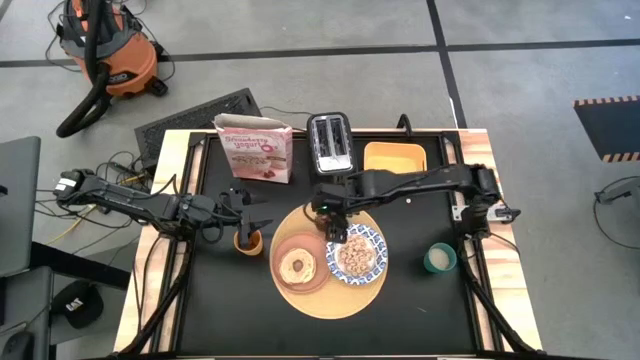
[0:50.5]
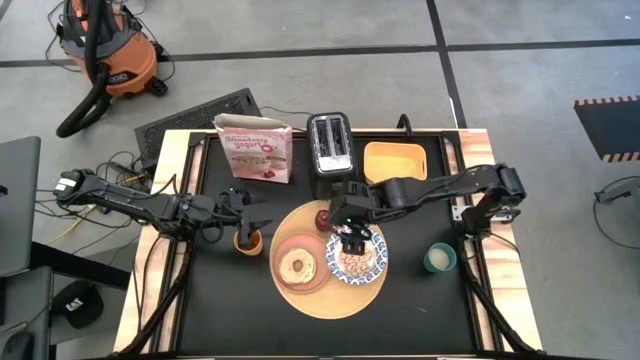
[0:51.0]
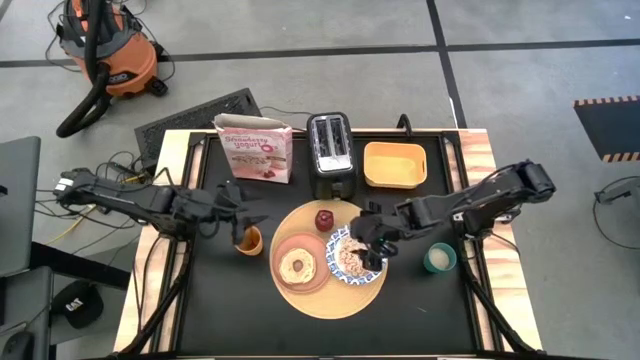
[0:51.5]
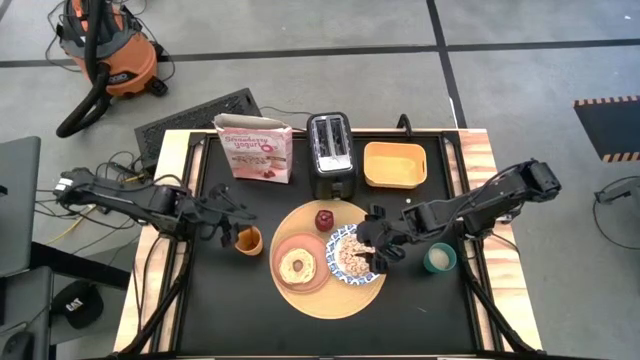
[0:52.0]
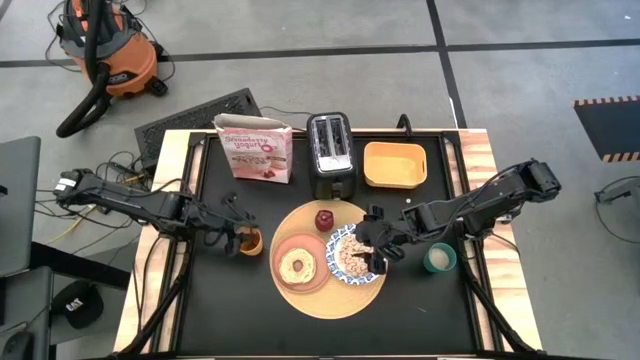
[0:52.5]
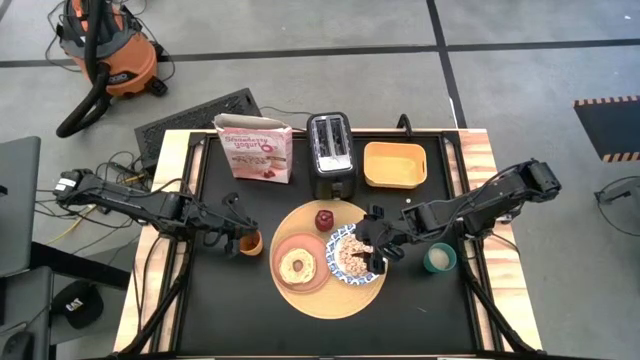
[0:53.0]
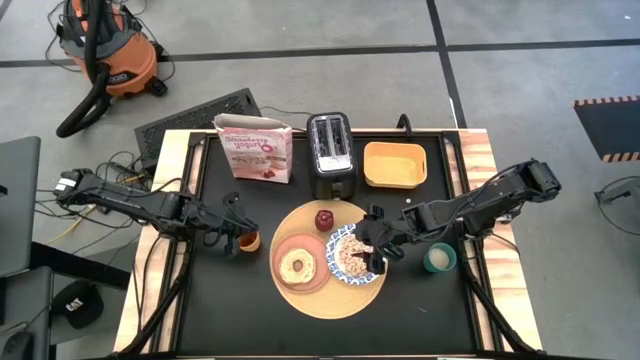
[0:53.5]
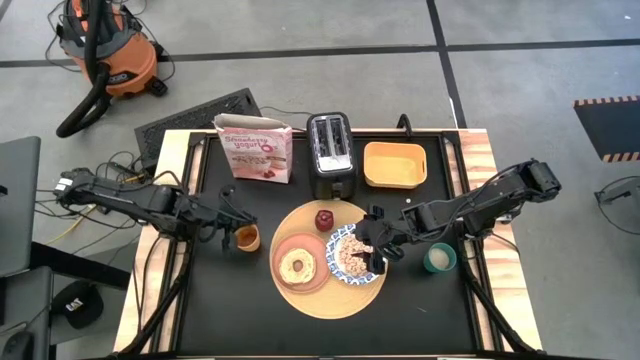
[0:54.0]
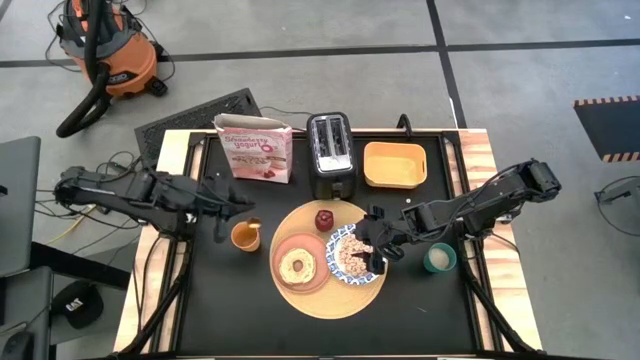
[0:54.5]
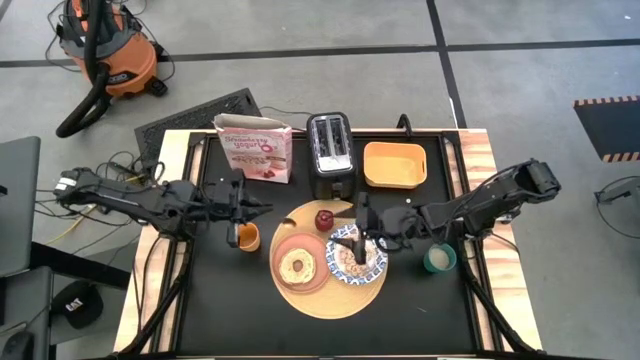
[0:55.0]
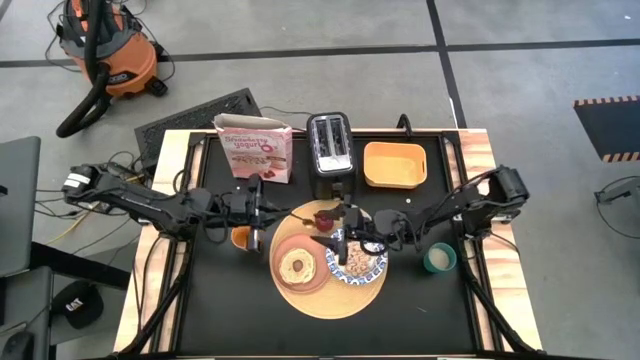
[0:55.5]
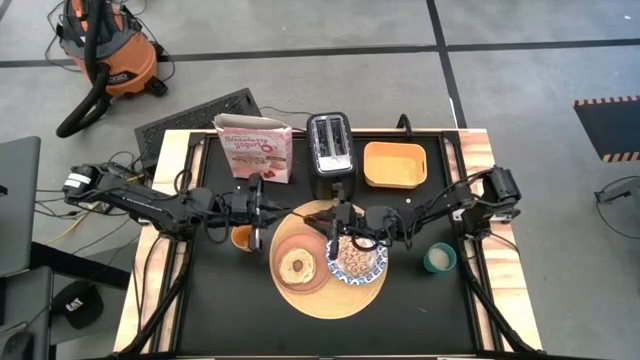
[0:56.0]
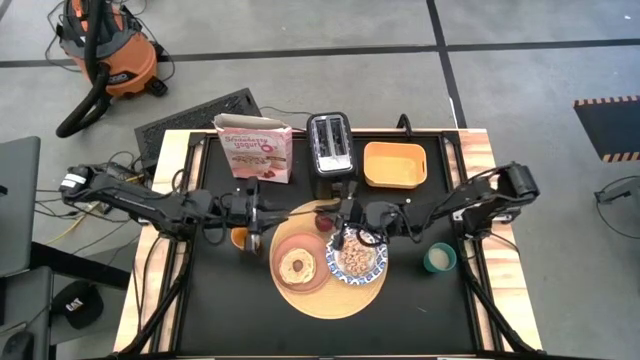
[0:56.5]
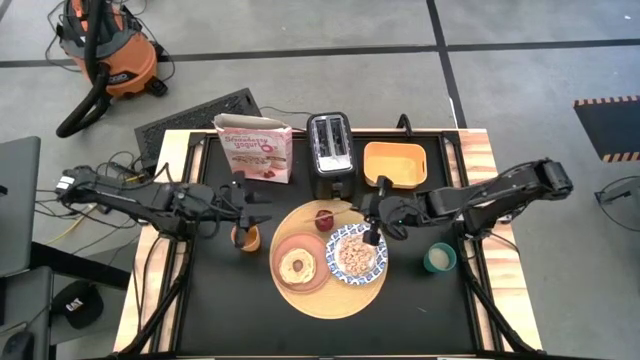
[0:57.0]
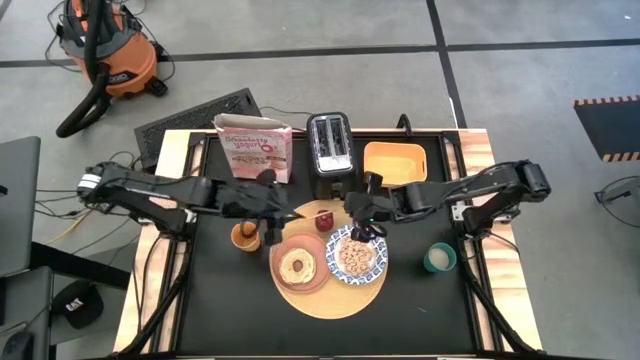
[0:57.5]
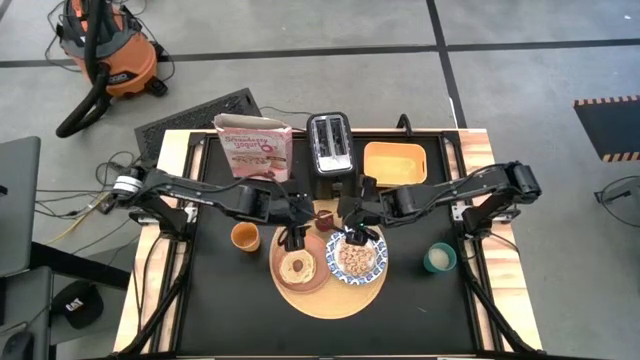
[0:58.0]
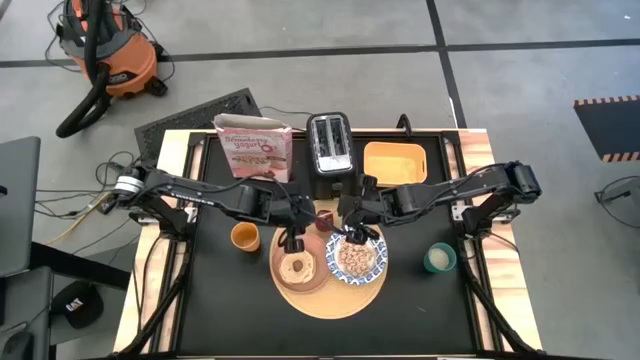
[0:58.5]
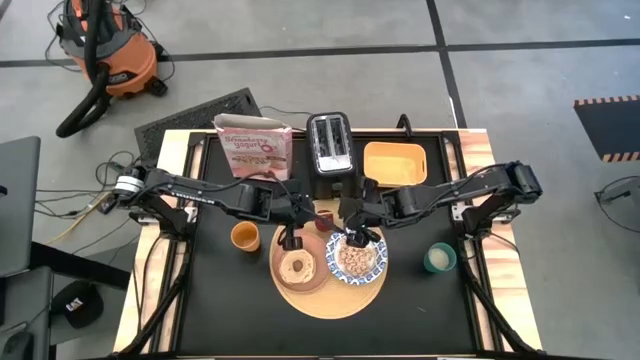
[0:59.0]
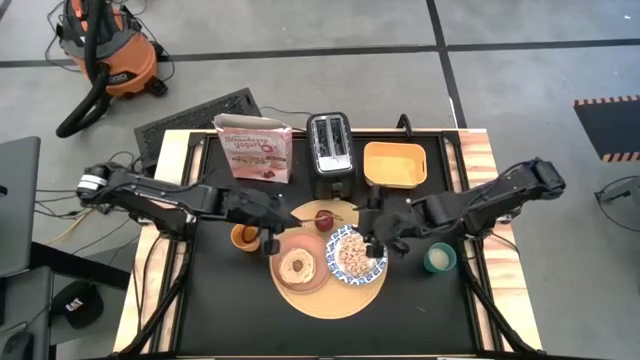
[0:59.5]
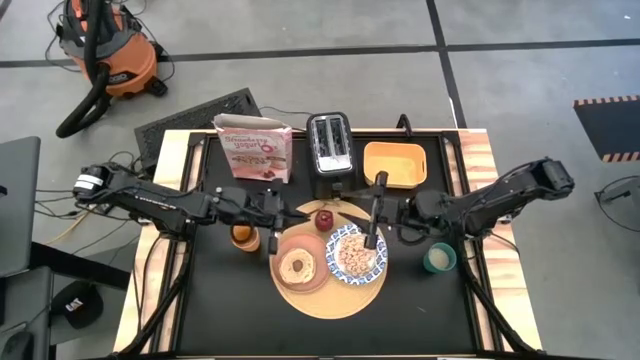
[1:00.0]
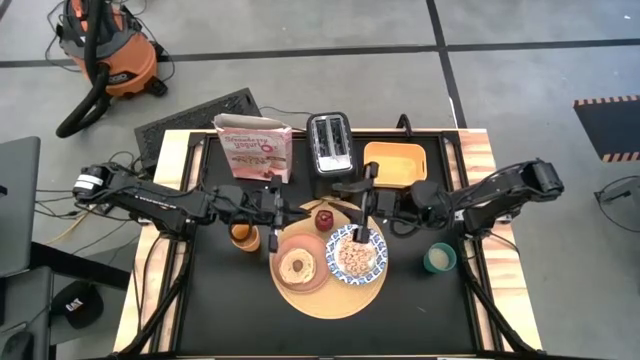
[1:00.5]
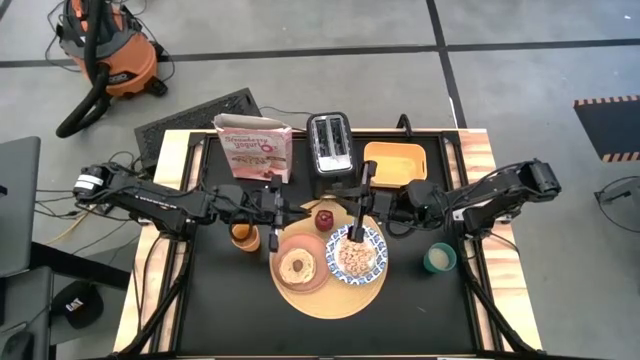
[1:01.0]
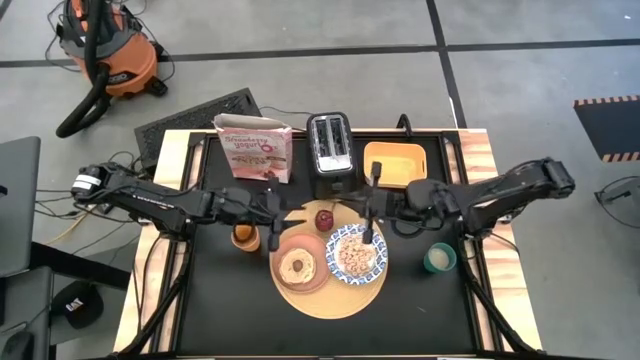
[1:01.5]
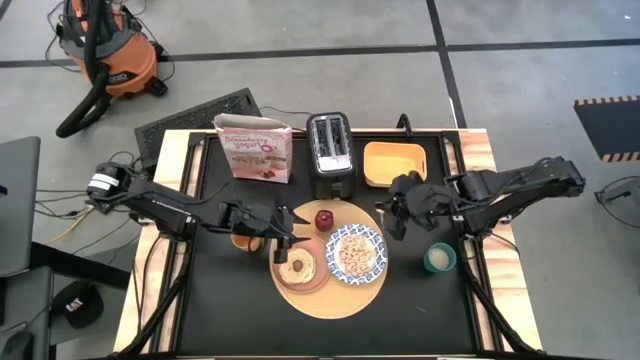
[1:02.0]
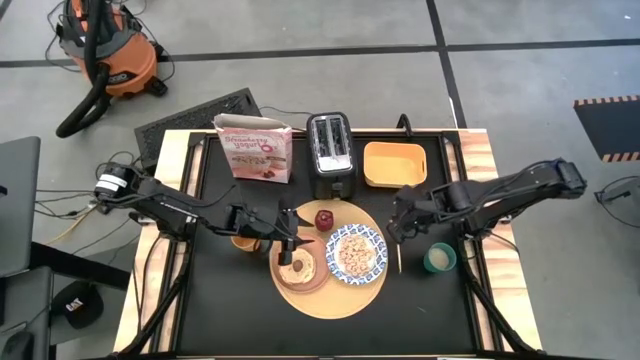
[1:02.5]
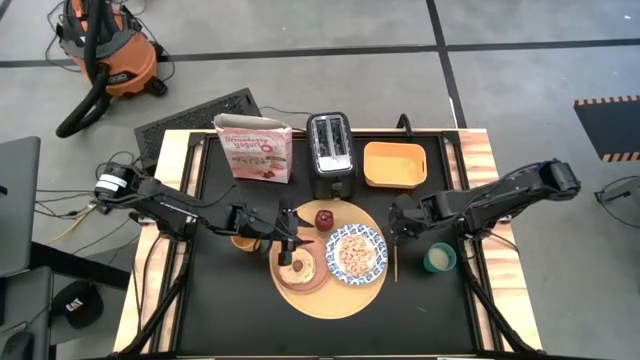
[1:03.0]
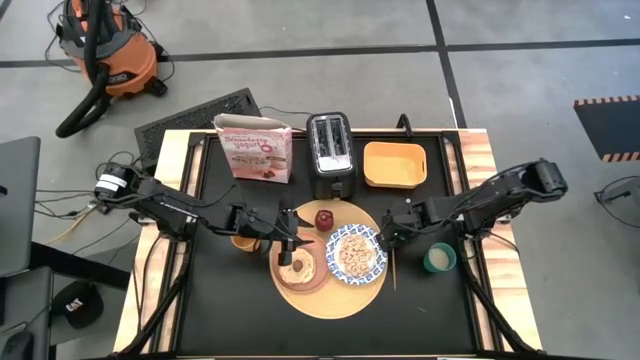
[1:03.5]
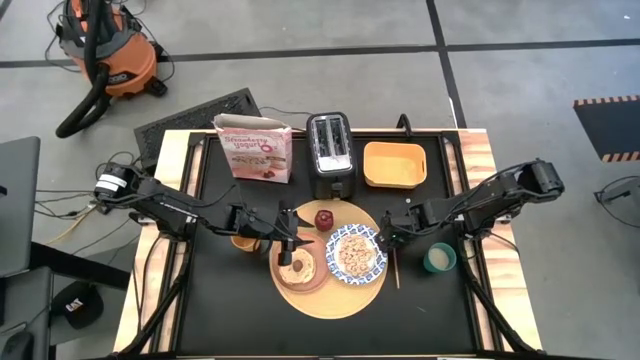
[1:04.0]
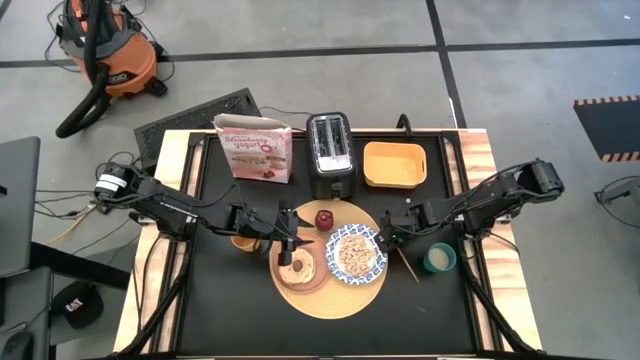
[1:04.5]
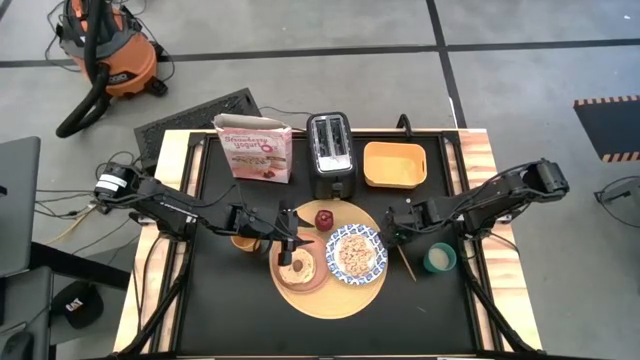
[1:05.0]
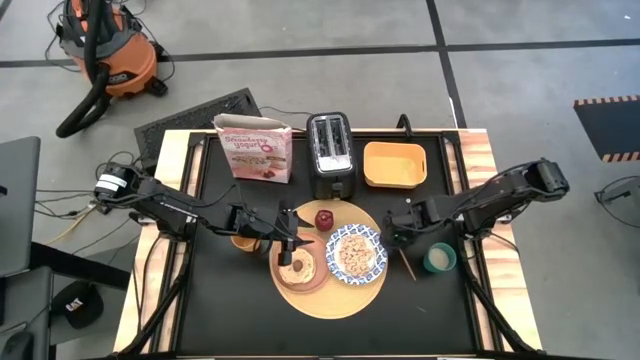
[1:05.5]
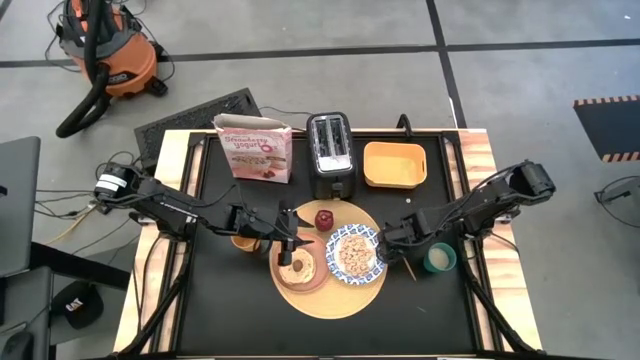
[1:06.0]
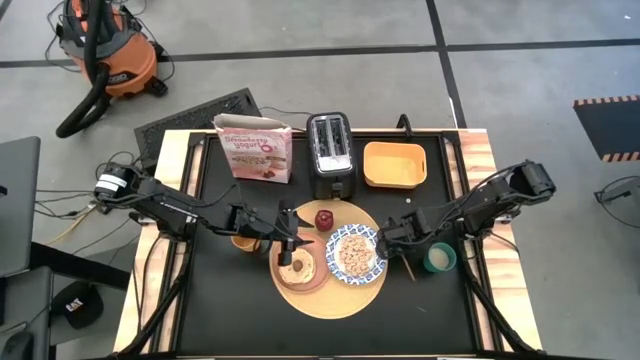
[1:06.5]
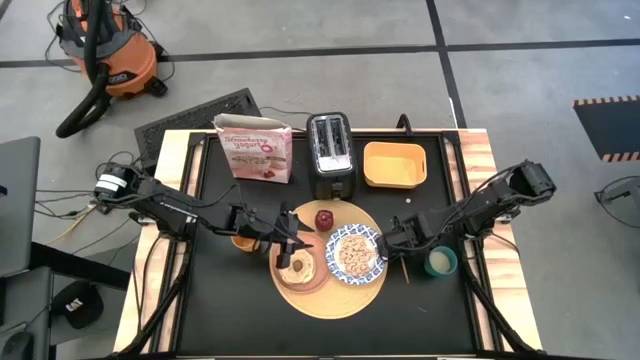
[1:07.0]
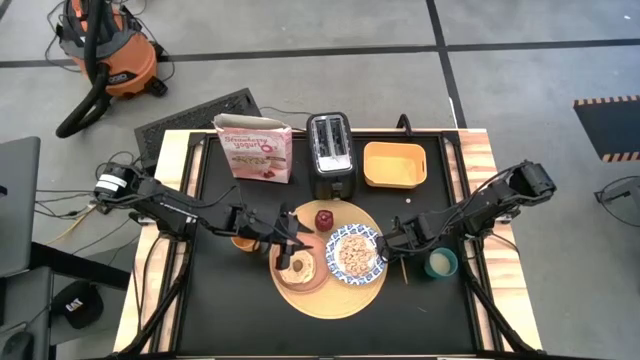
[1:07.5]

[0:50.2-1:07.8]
Task: Arrange a breakfast setting
Move the spoon beside the bowl on the table mat

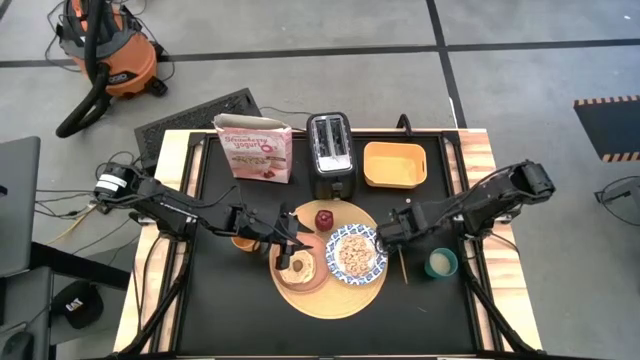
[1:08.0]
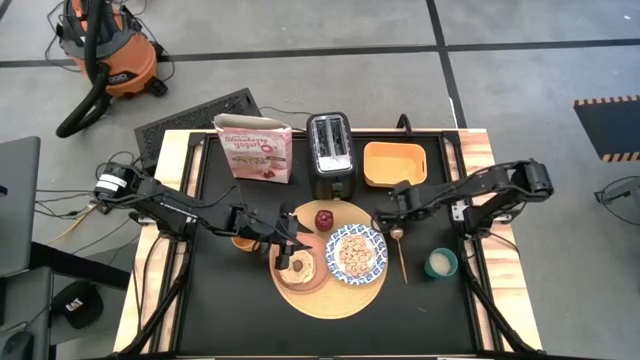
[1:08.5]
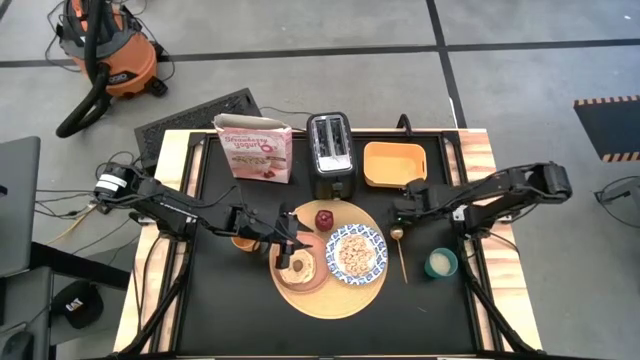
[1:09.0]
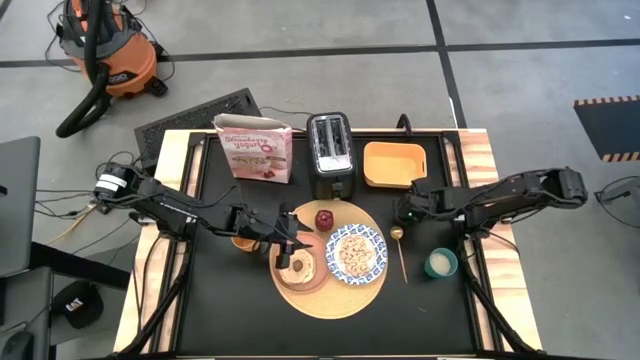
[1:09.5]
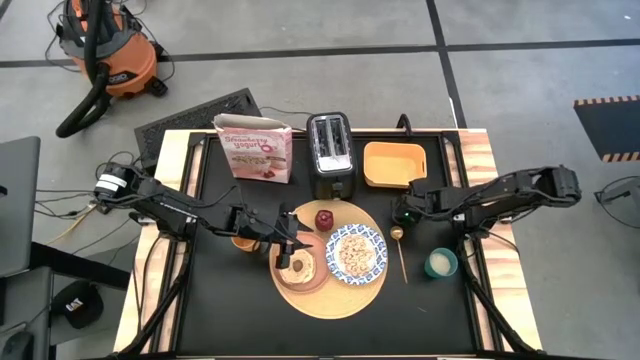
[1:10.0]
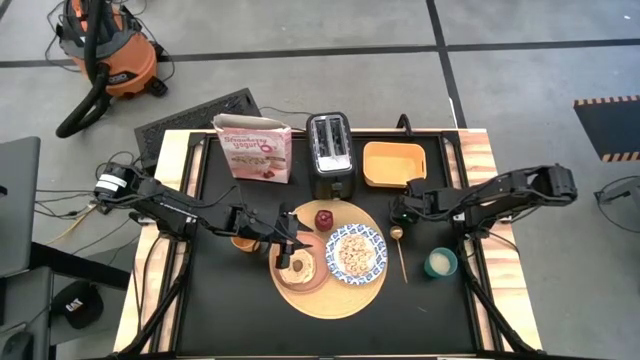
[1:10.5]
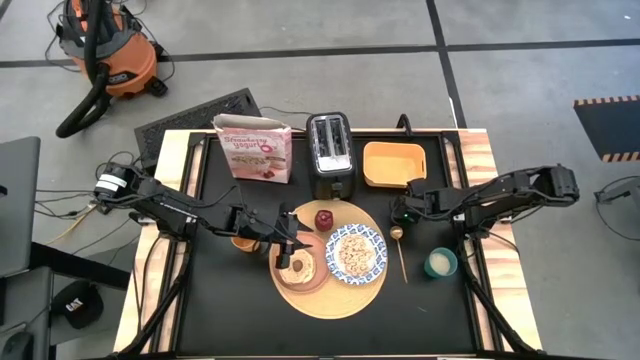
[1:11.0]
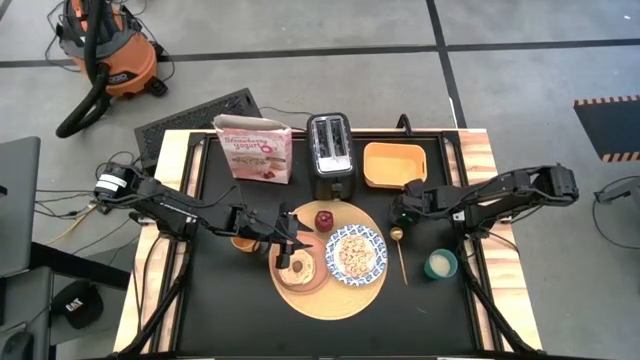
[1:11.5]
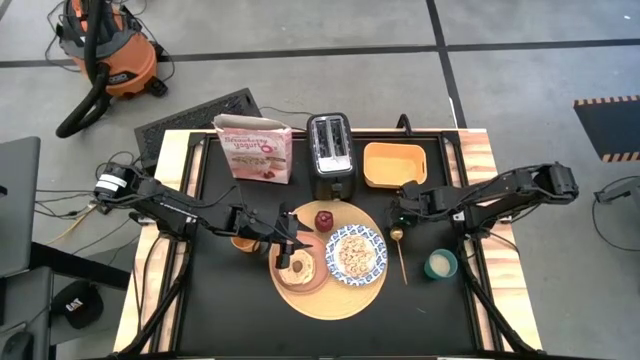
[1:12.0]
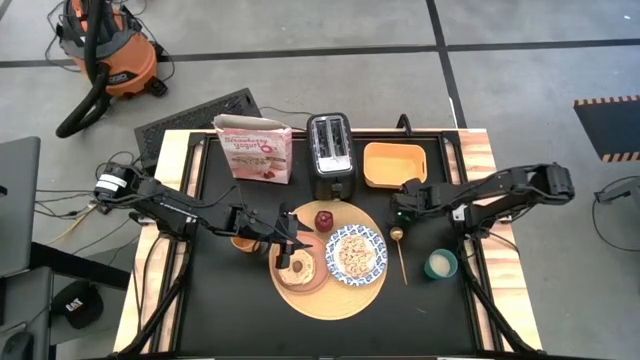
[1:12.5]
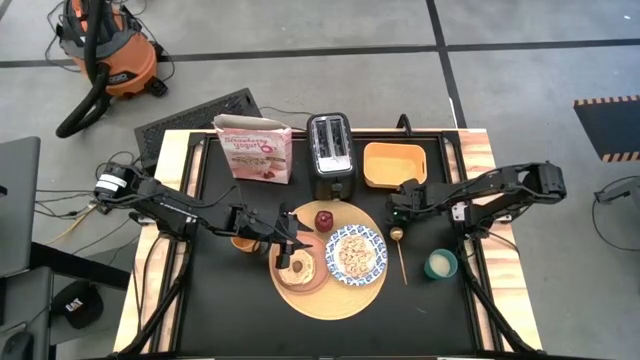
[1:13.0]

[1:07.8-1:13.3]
Put the cereal into the bowl

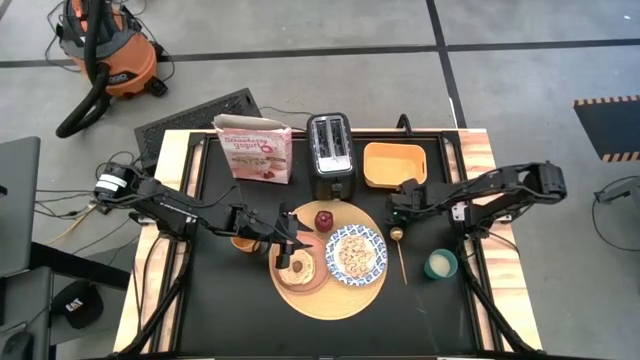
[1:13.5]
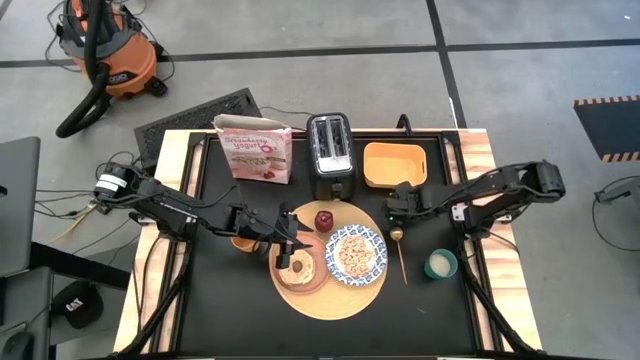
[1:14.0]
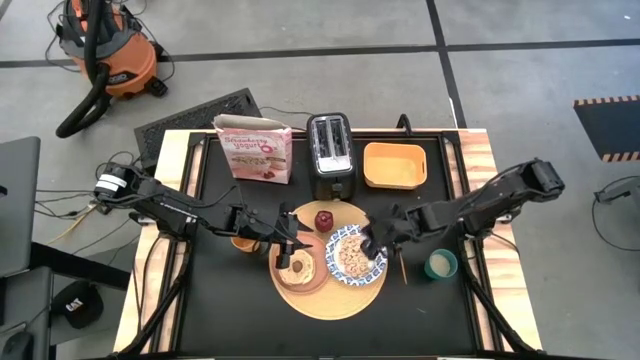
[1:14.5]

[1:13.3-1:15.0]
Put the cereal into the bowl
